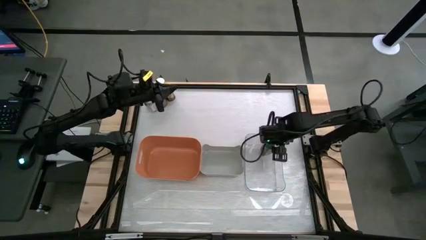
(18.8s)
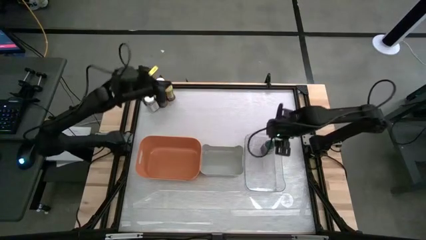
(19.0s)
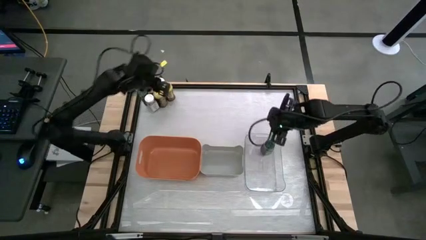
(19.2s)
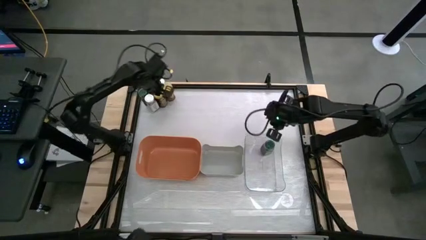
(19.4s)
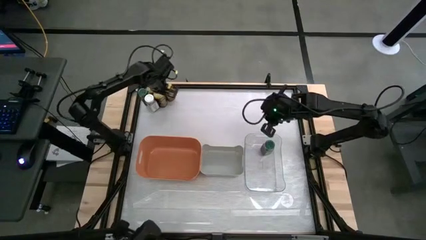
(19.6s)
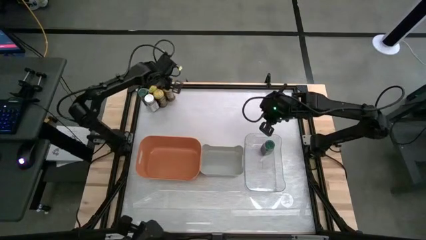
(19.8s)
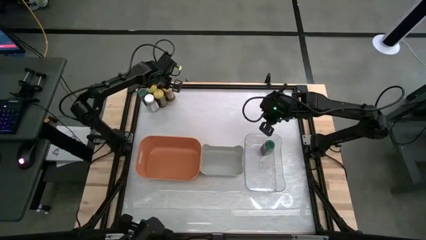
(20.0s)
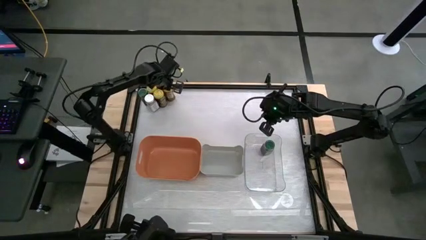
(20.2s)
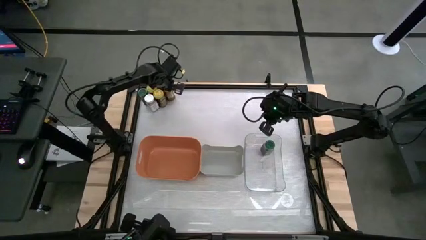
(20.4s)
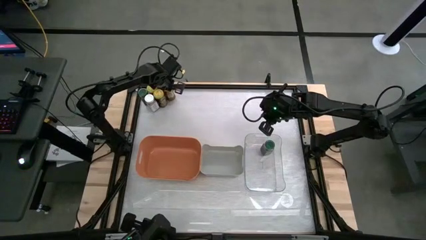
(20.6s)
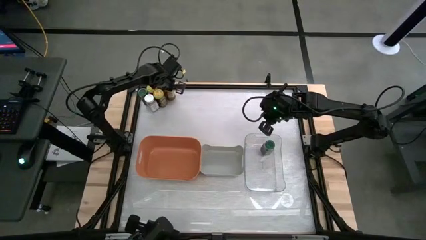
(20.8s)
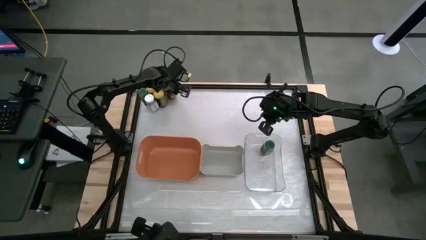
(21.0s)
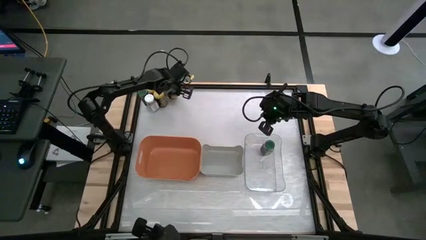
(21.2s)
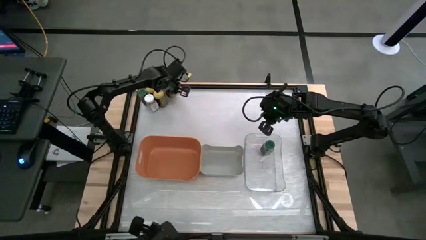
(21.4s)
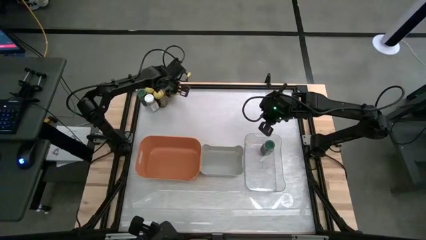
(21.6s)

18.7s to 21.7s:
Task: Sort spices by type
Put the top right yellow seasoning can into the orange bin

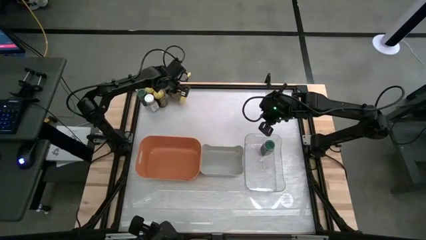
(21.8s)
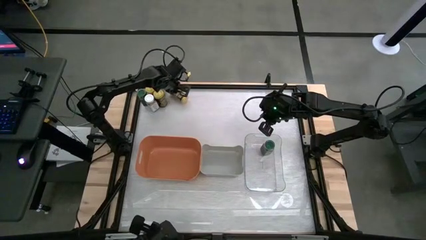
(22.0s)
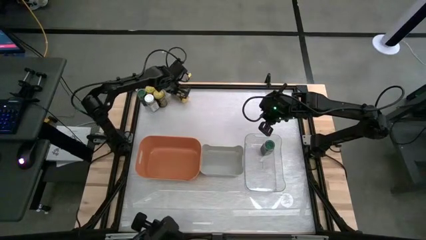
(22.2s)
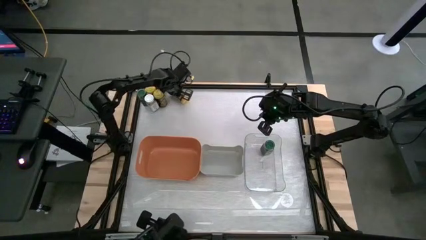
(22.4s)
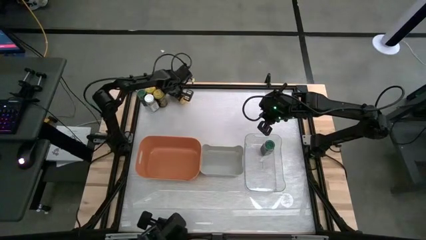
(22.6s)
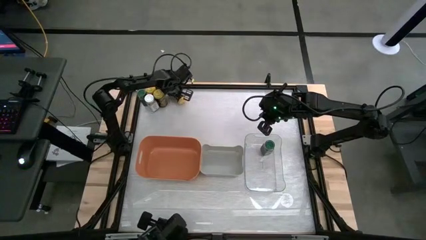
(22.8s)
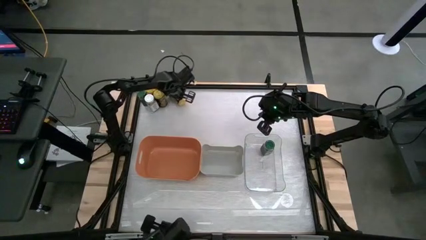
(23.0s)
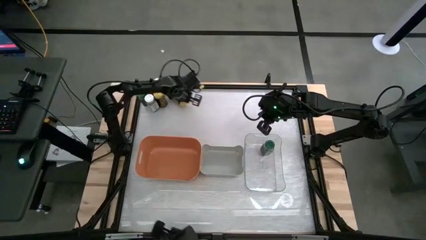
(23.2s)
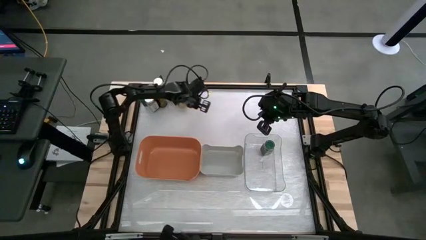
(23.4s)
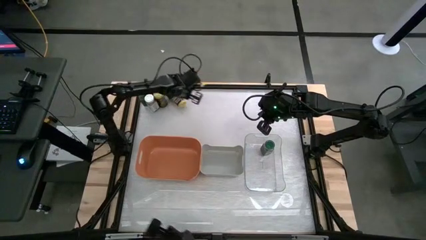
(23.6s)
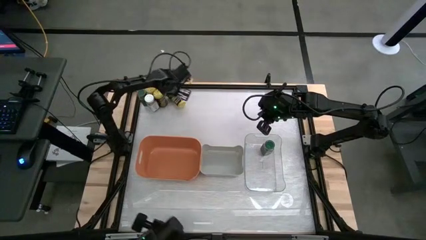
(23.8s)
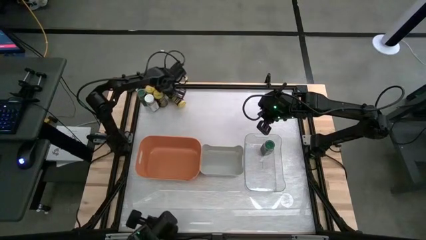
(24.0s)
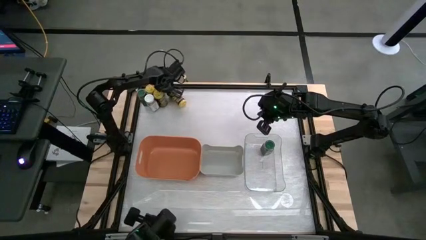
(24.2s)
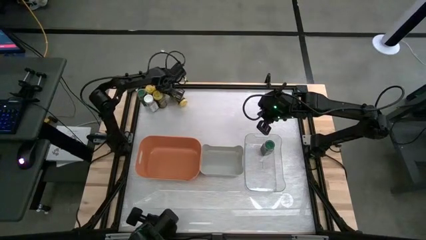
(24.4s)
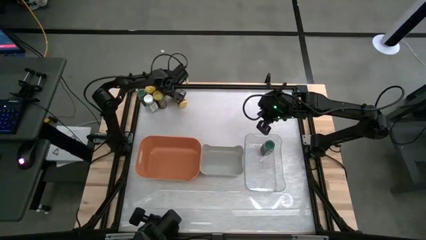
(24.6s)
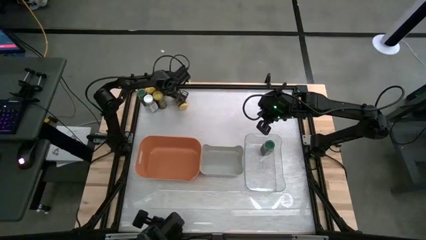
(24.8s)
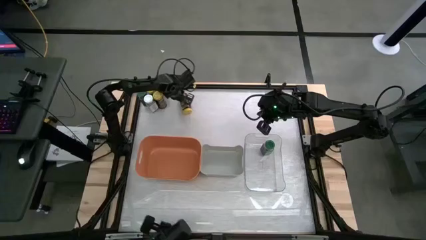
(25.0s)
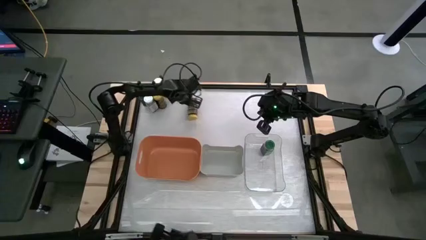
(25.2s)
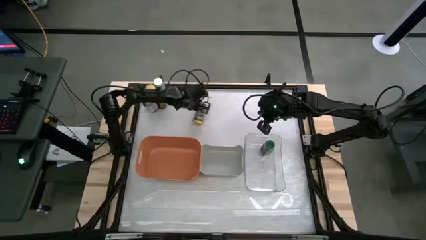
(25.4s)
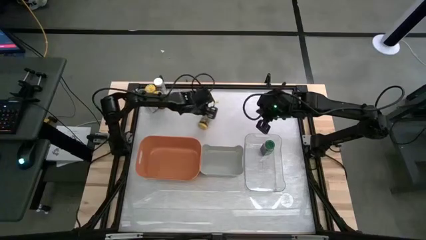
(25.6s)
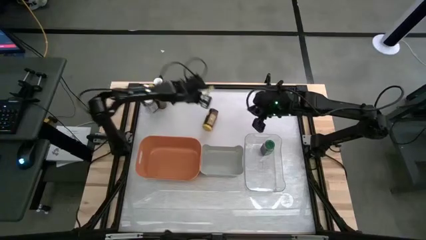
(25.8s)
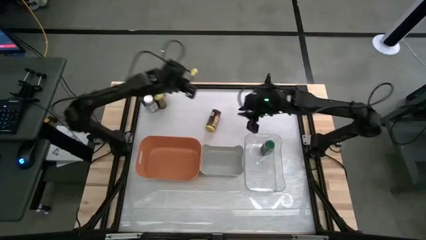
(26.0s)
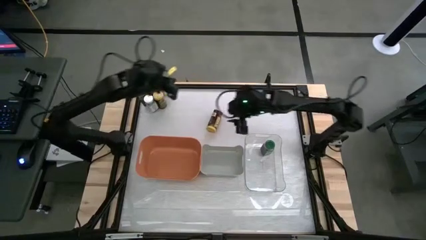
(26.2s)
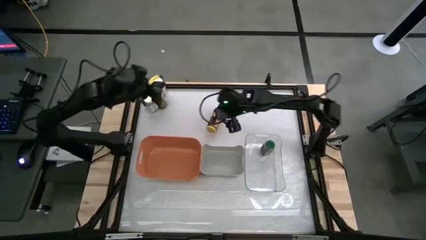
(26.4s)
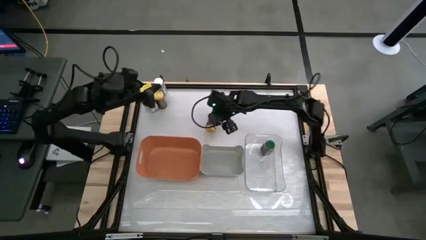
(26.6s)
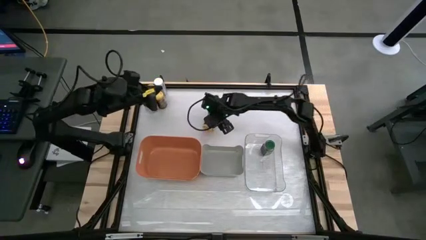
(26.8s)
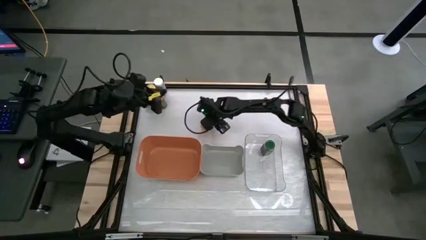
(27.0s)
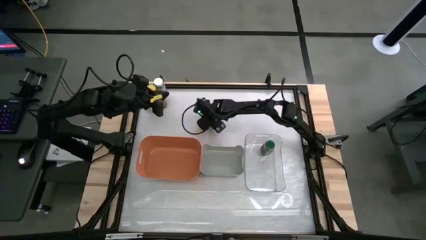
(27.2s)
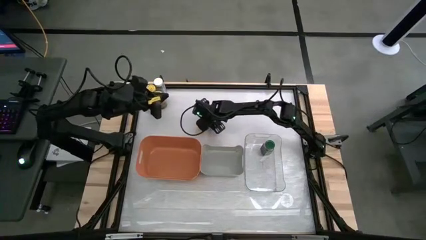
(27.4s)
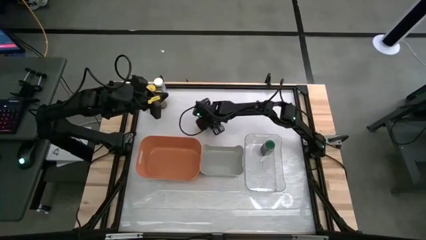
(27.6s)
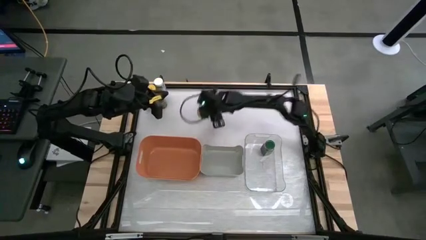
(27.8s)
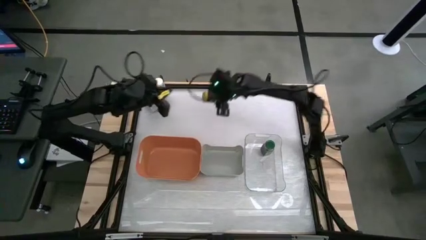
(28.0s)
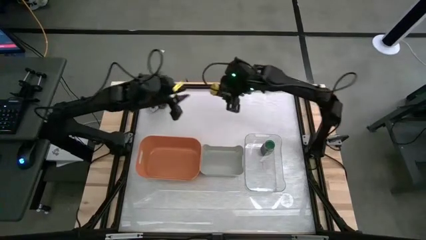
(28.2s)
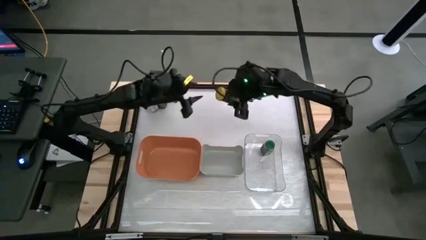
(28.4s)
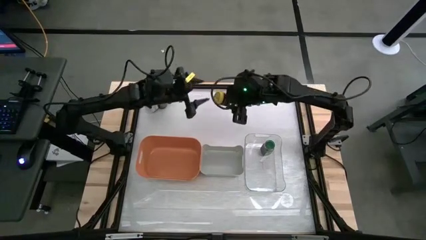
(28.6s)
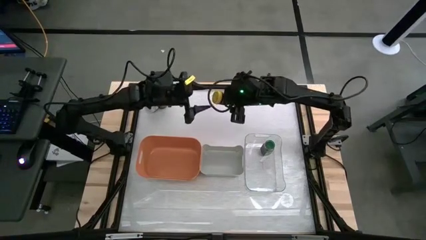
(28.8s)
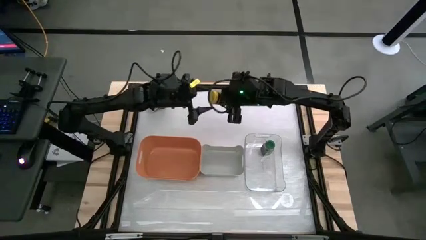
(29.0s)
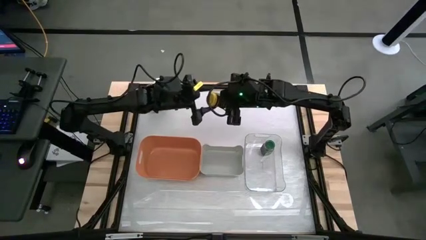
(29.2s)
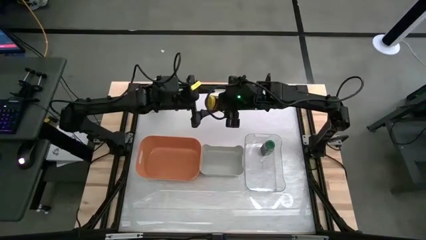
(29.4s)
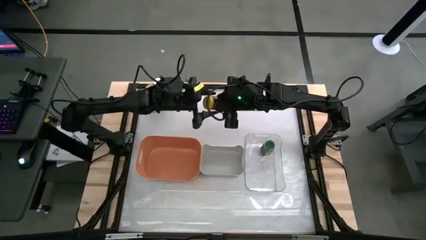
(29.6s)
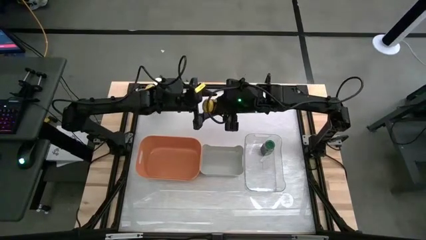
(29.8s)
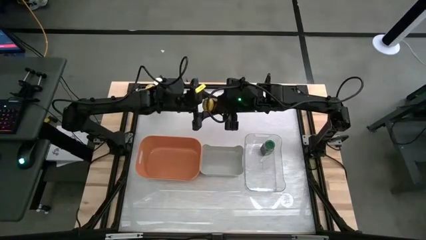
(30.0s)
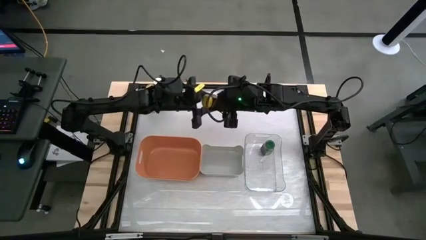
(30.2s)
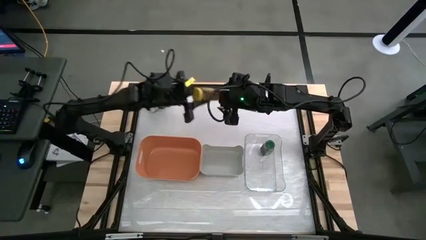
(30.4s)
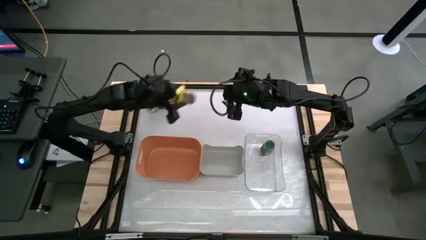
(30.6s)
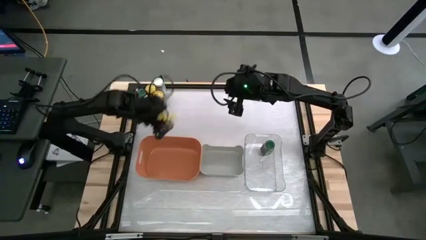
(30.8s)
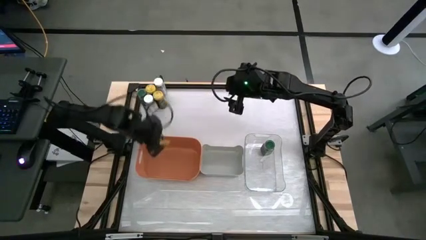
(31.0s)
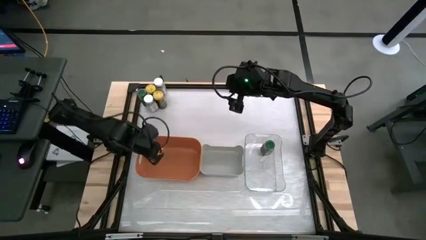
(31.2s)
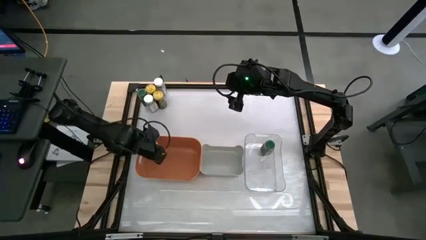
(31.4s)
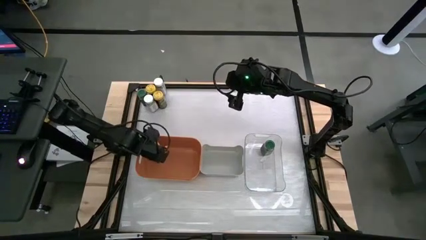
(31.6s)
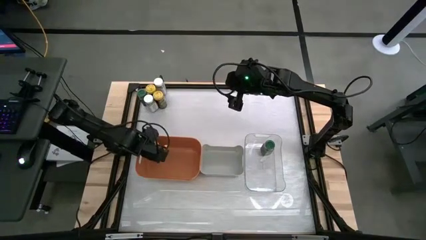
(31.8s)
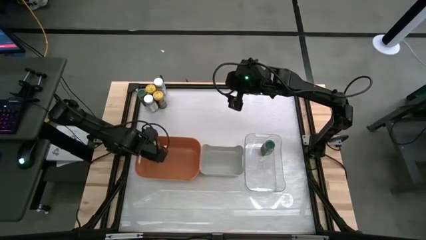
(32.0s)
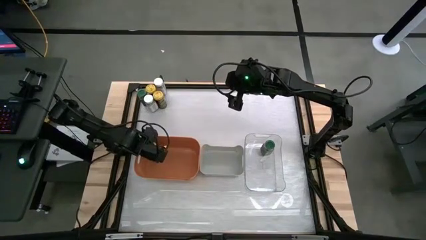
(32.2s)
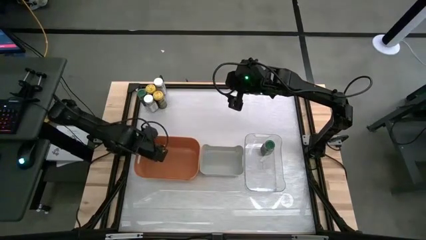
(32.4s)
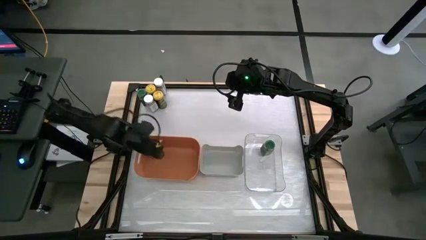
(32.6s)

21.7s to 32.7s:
Put the top right yellow seasoning can into the orange bin

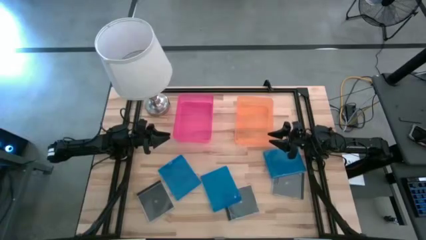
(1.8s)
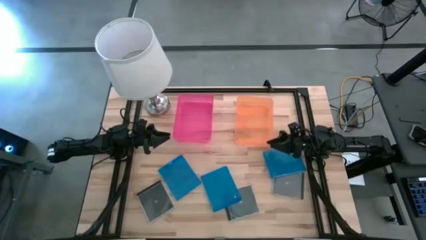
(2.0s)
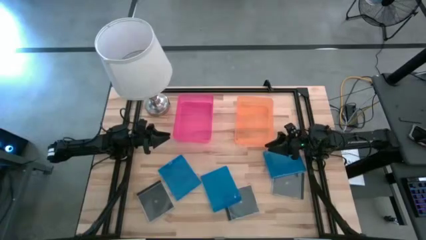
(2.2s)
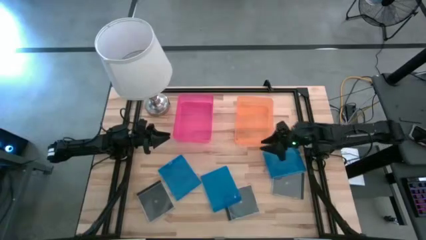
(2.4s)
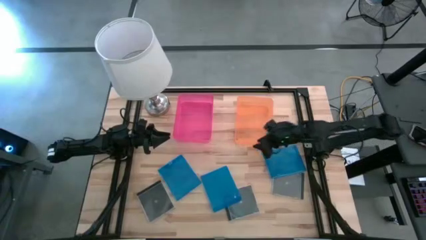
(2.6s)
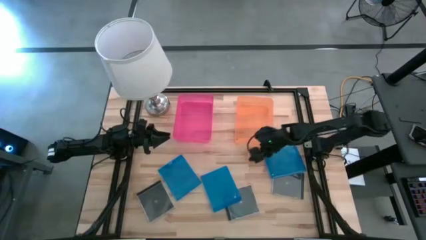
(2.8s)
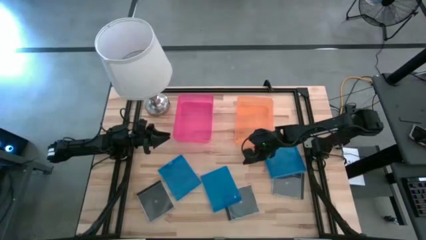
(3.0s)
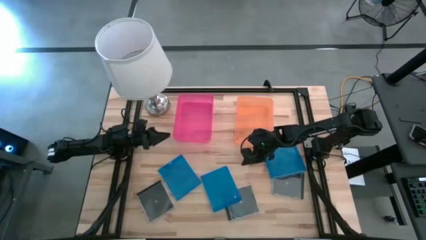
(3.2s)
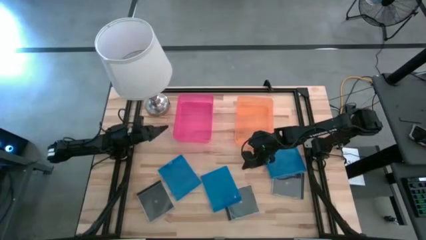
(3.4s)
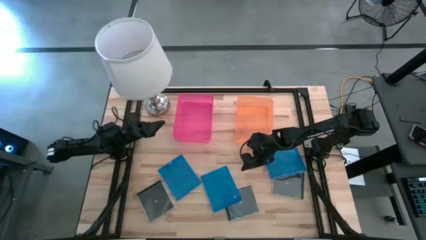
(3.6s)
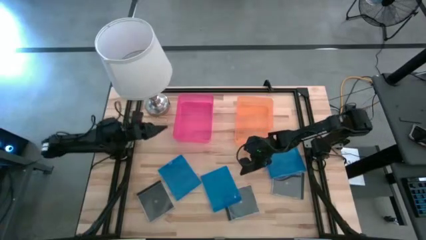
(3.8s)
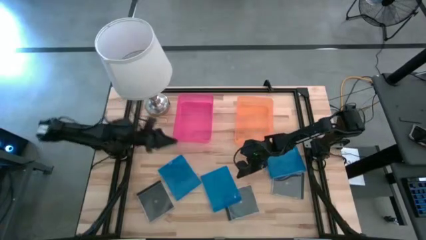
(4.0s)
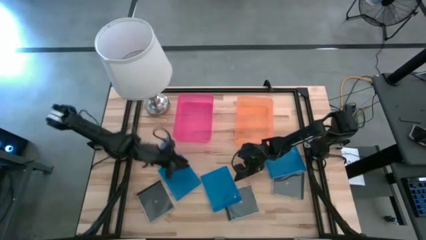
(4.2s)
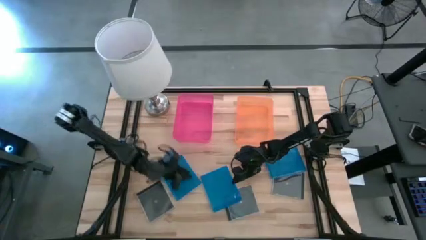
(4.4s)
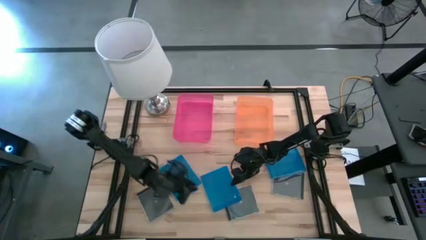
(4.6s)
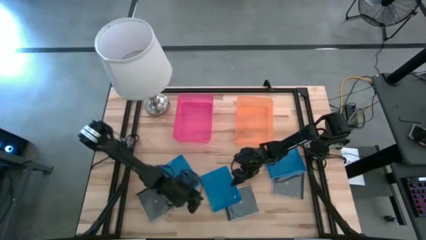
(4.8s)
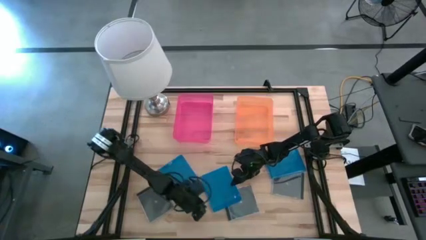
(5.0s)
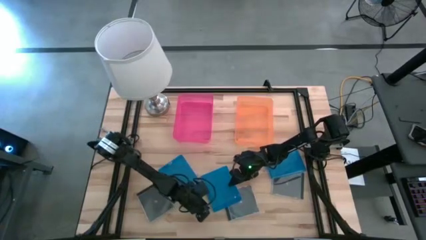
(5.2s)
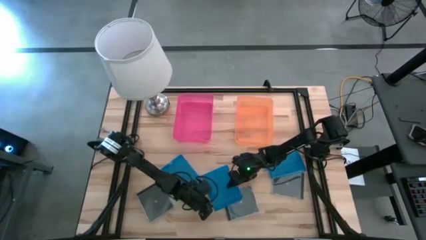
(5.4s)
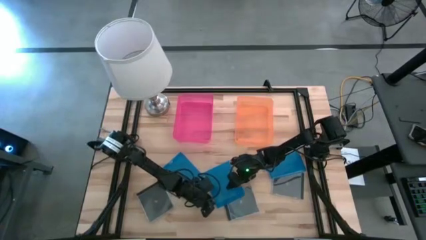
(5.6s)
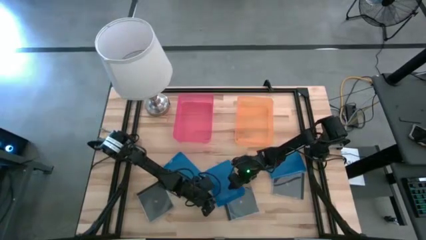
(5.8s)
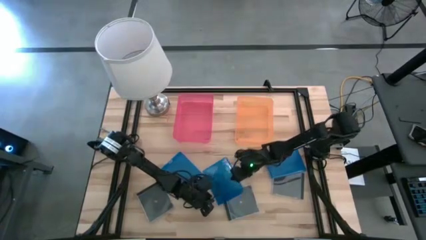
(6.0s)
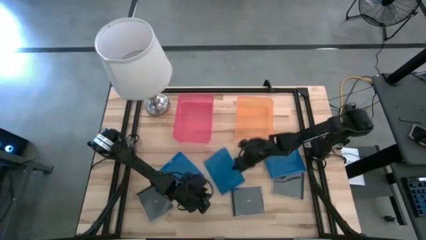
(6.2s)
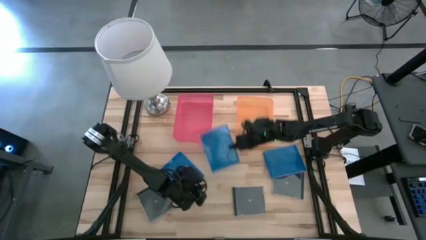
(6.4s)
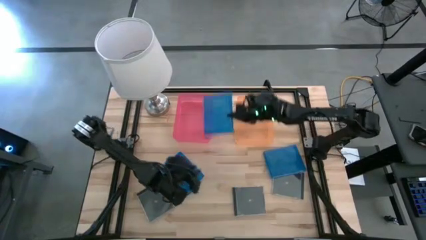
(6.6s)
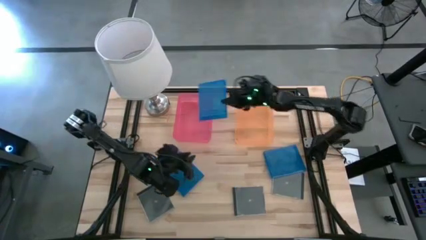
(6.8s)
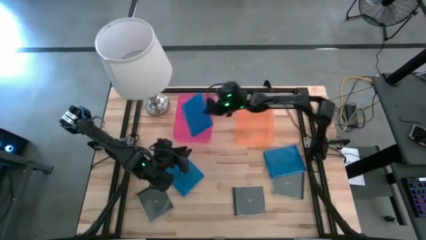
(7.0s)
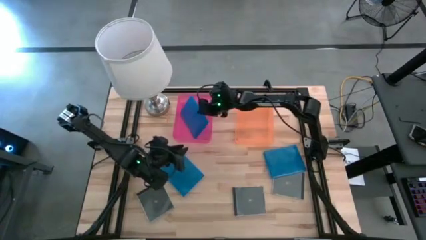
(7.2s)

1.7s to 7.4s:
Task: Pick & place jewel cases by type
Put the middle blue cd case into the pink bin
